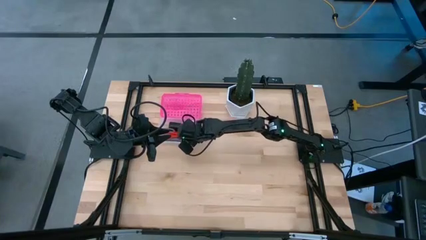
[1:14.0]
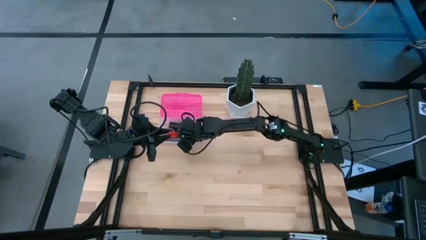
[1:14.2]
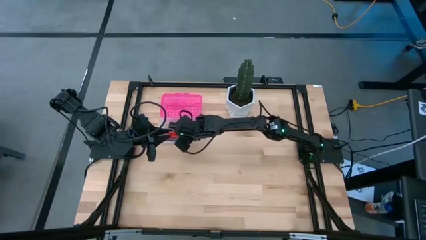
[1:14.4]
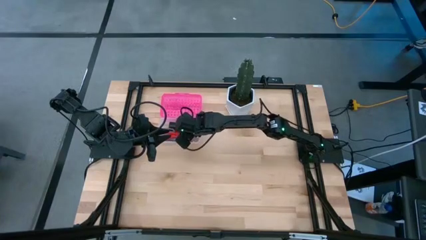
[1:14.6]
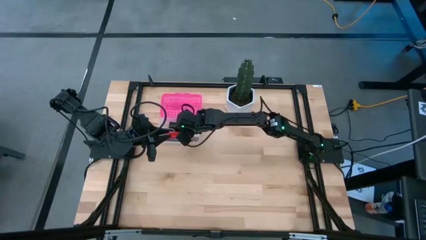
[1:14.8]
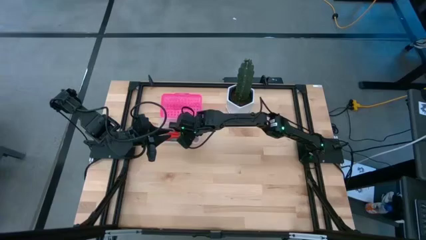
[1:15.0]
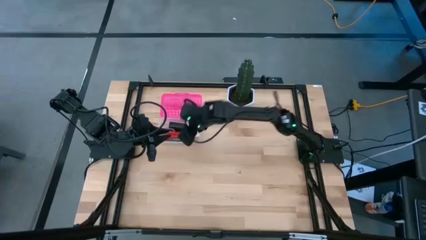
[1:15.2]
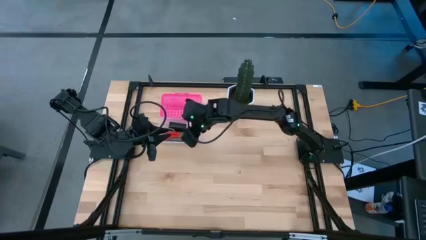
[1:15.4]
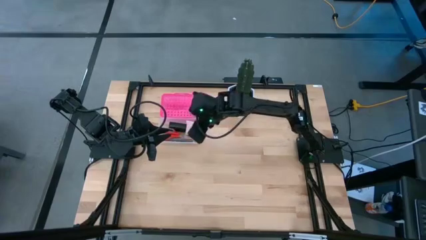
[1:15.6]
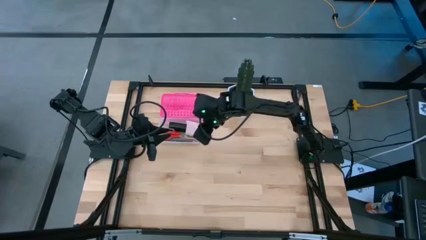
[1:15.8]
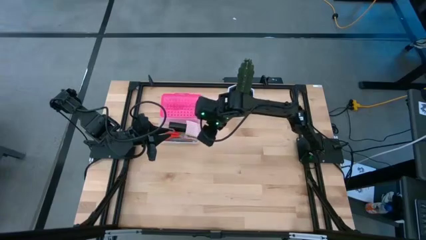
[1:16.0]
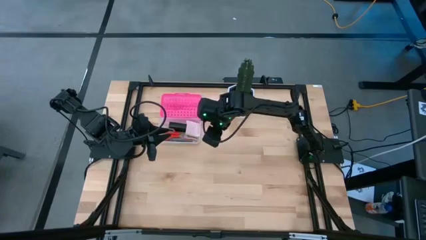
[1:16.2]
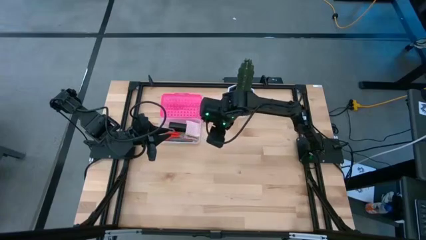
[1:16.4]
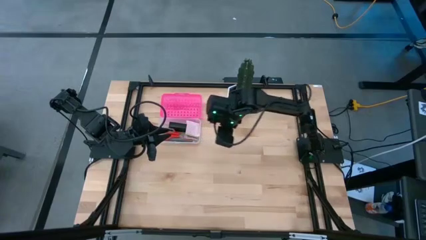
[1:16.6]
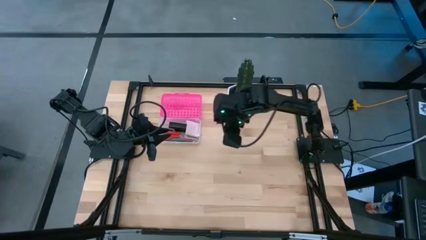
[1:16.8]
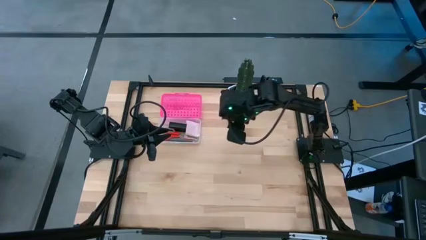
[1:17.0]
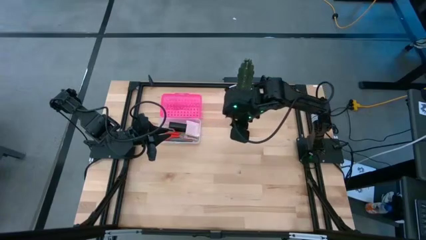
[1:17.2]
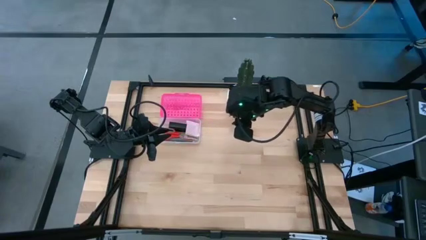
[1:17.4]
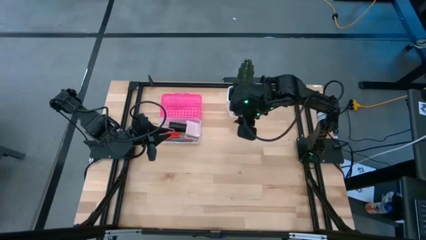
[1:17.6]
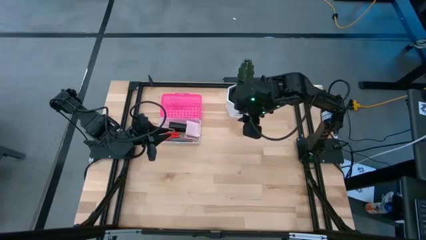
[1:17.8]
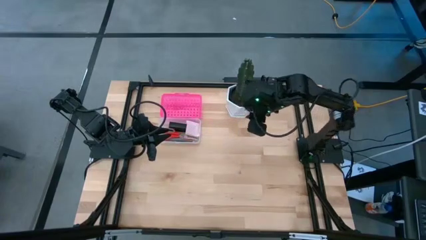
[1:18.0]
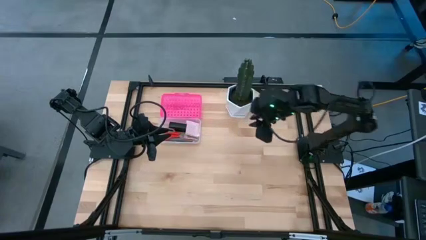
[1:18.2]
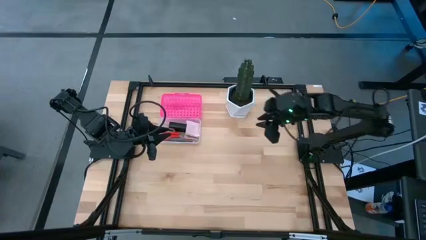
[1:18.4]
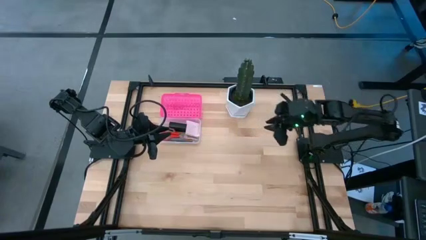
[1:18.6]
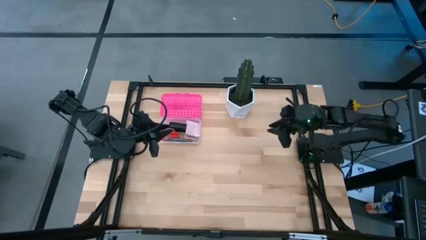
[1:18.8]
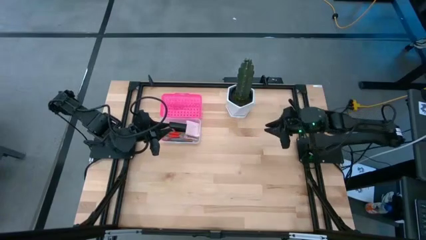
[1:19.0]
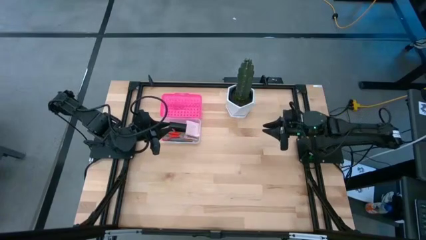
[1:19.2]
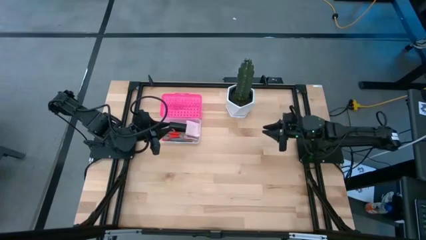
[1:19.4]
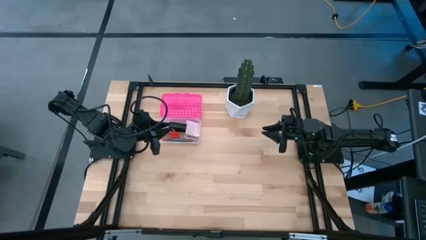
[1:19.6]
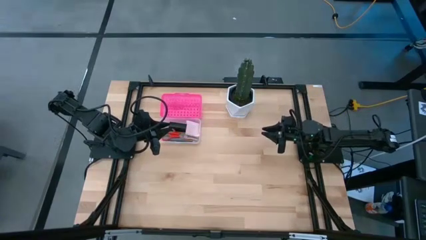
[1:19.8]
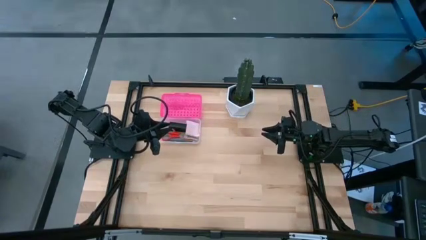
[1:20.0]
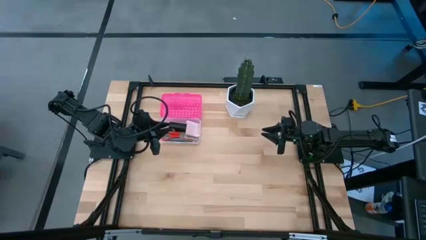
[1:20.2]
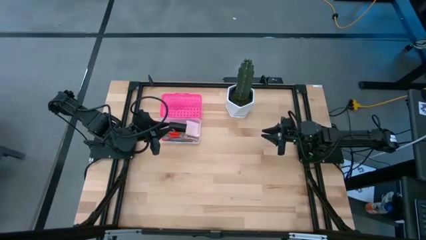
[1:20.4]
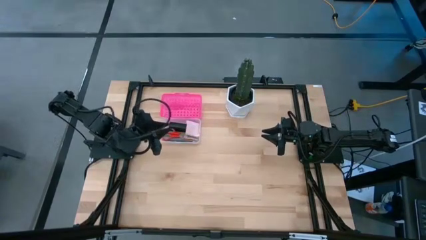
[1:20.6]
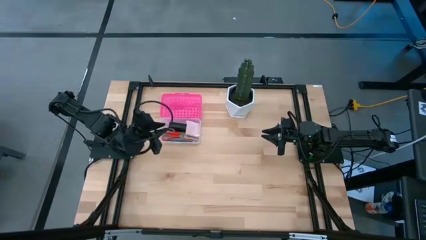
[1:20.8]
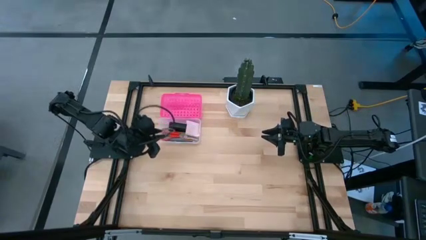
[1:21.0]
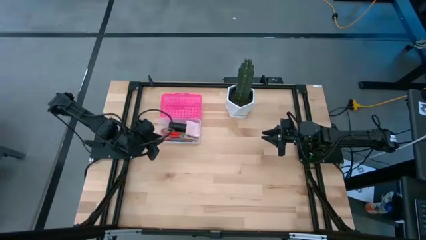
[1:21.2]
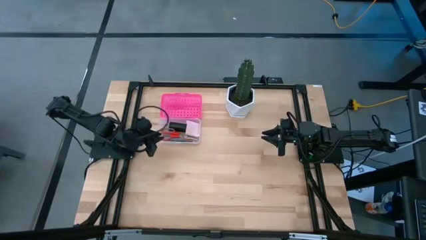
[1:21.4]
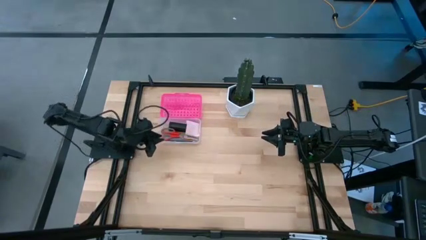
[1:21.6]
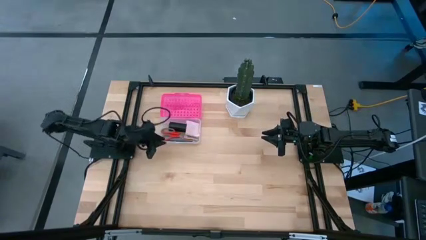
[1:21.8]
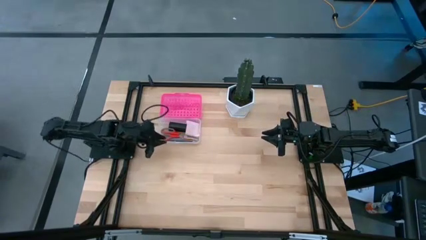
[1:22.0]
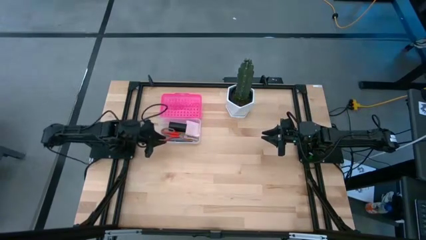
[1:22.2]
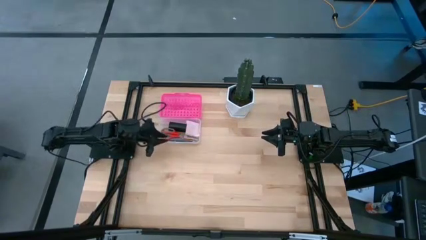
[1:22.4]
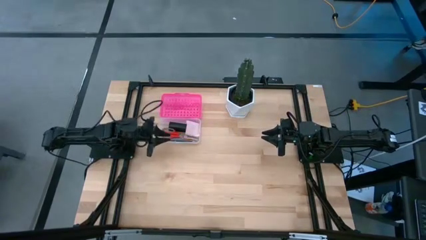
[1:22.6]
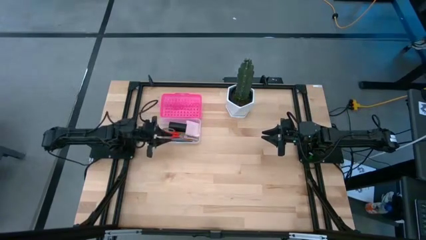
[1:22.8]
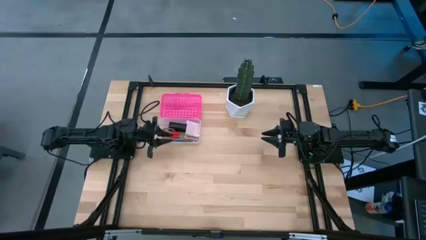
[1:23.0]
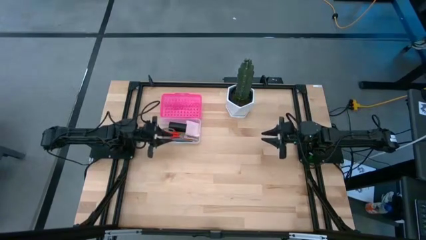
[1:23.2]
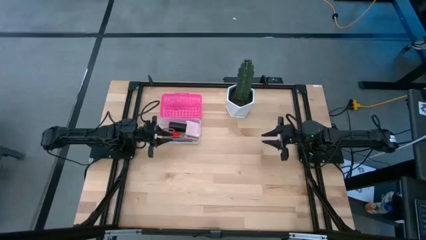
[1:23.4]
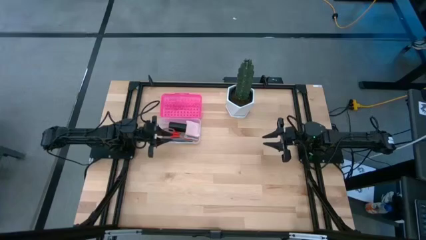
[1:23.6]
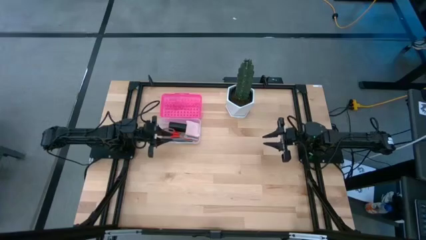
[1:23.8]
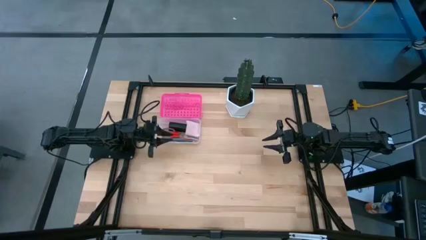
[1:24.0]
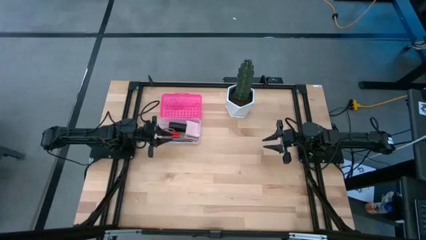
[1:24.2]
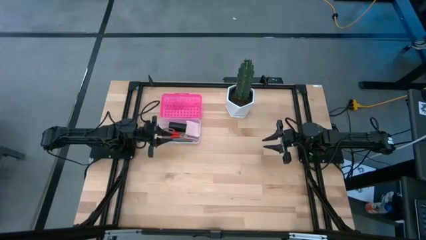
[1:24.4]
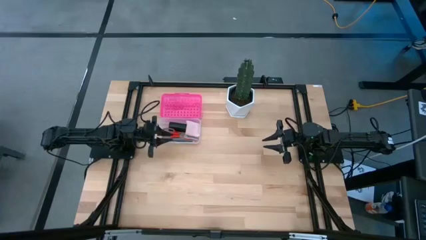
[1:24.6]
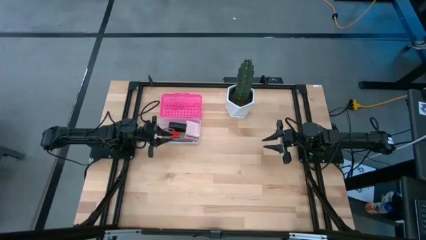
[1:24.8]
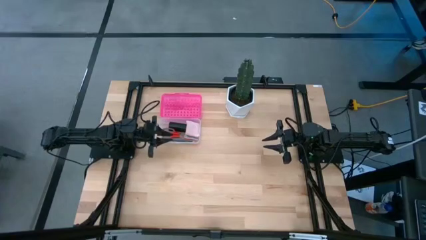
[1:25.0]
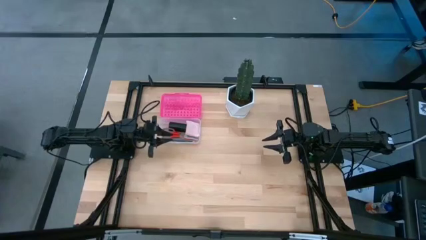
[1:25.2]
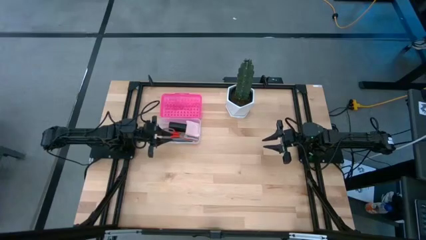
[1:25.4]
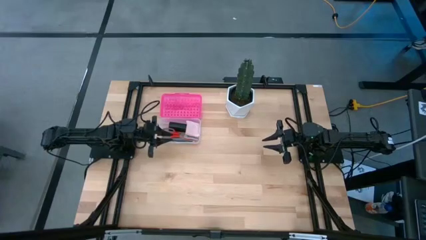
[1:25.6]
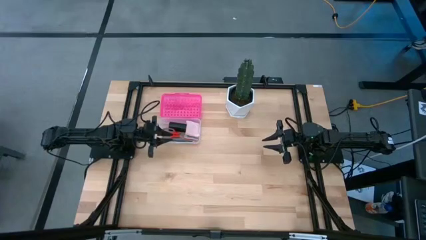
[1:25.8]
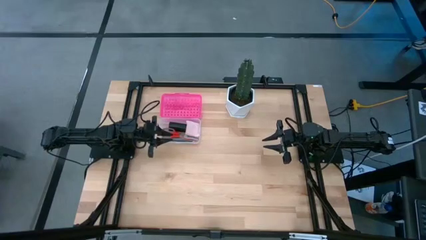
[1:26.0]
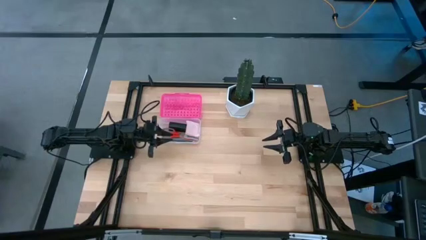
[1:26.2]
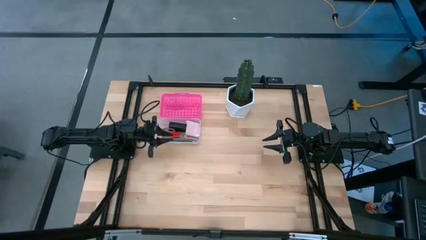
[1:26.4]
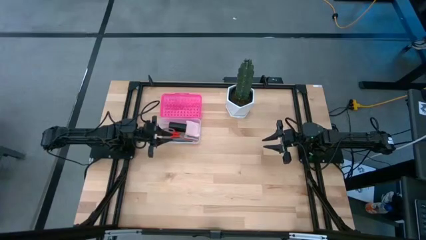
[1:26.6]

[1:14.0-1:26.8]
Task: Pack school essentials
Return to Home Position

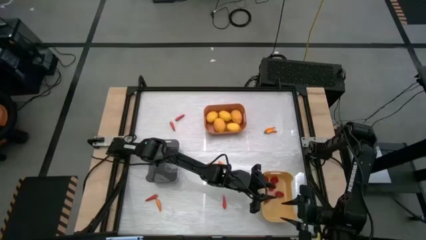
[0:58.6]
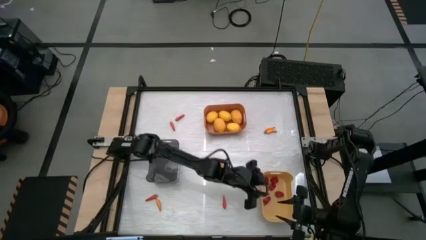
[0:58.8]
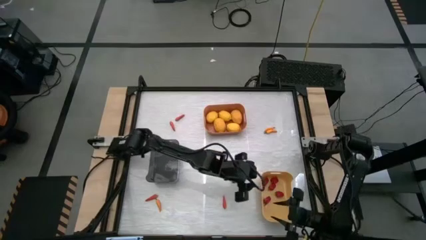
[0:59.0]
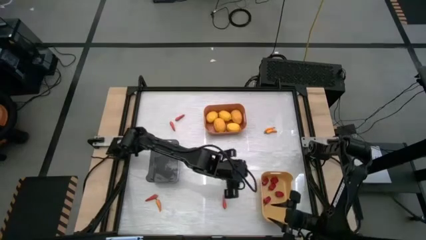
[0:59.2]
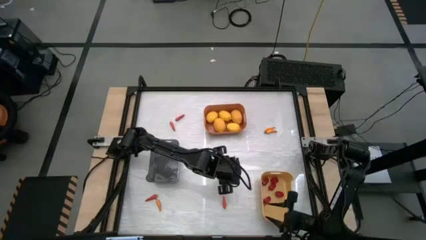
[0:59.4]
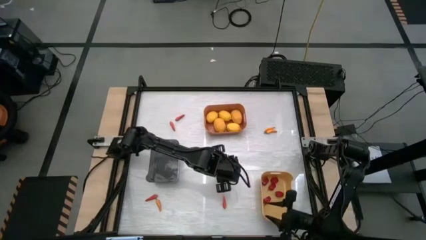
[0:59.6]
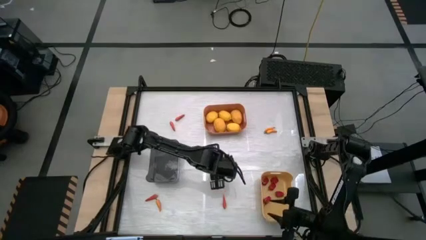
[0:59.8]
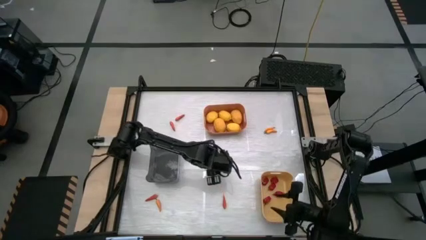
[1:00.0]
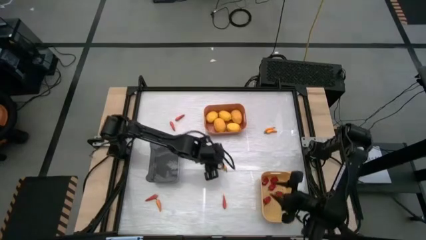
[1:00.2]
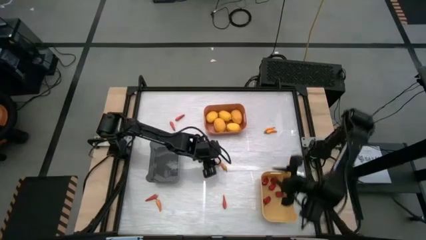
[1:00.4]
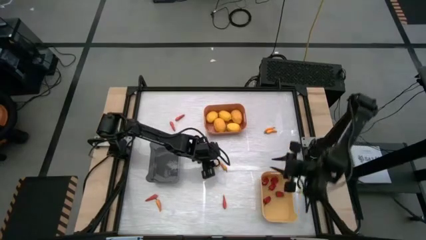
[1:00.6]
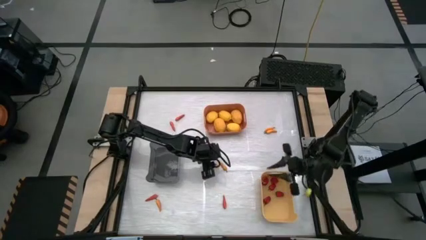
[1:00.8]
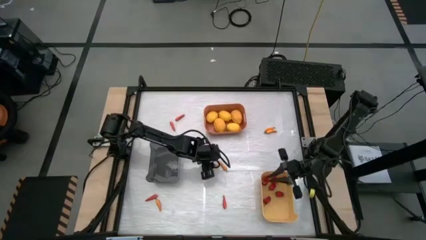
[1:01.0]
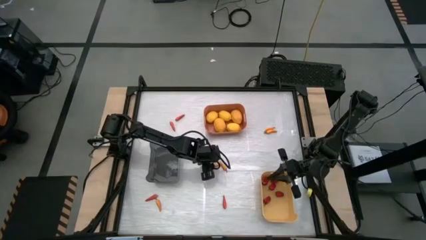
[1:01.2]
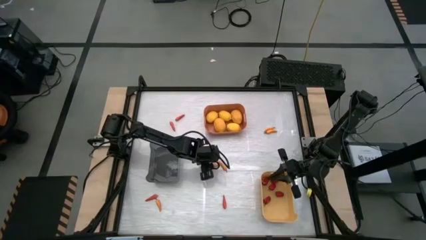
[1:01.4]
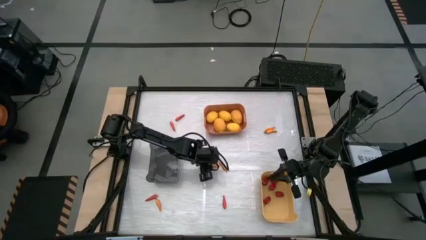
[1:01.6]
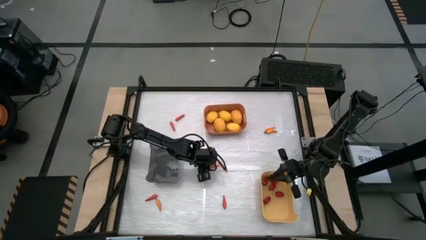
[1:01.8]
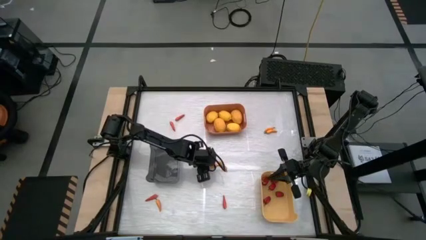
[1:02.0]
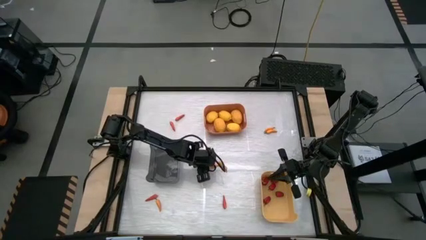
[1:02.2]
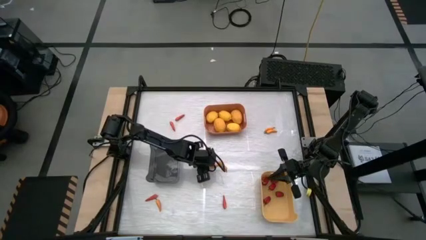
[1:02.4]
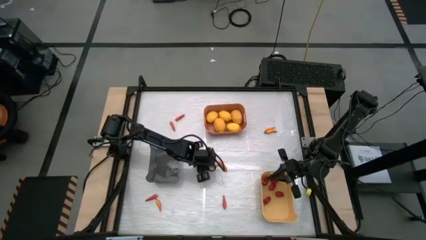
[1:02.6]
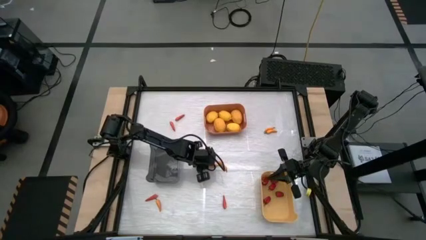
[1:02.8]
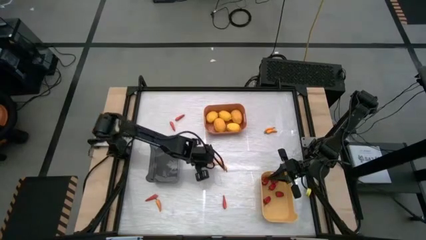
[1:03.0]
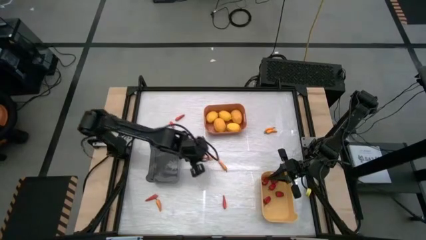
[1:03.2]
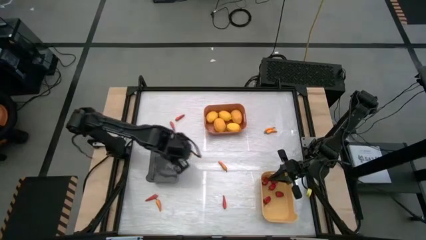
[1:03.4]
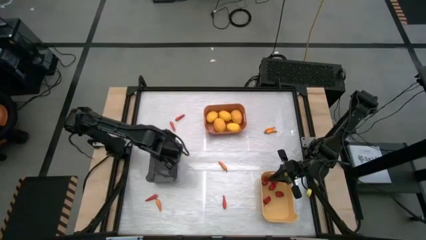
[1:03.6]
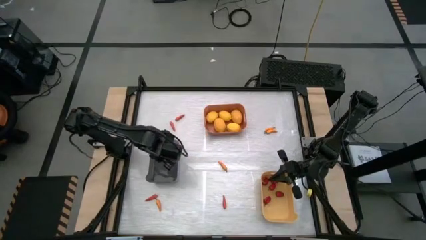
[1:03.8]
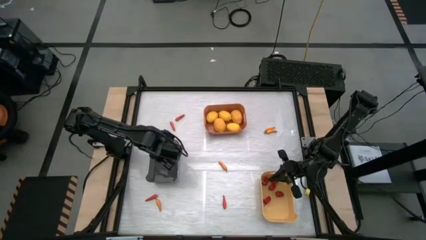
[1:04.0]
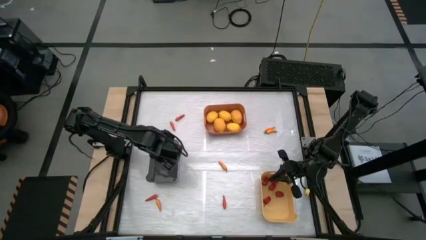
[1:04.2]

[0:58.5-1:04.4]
Task: Sort produce into baskets
Put the yellow chili pepper into the black bin
